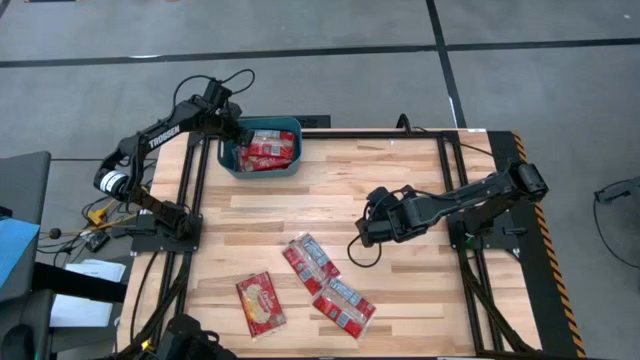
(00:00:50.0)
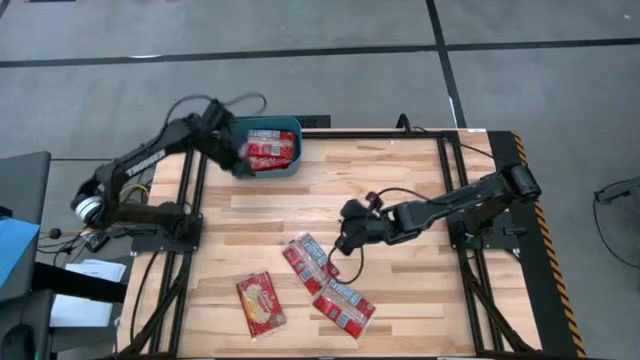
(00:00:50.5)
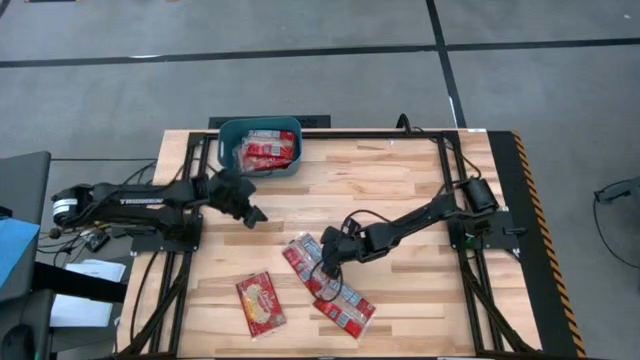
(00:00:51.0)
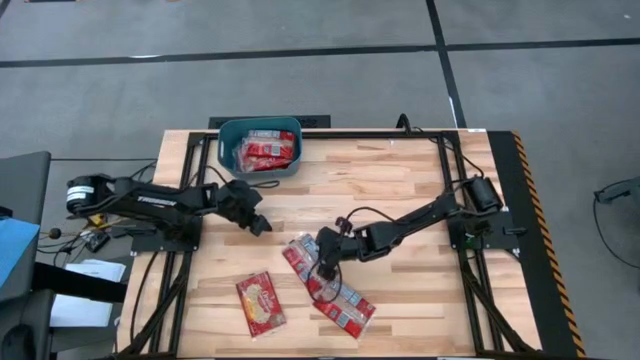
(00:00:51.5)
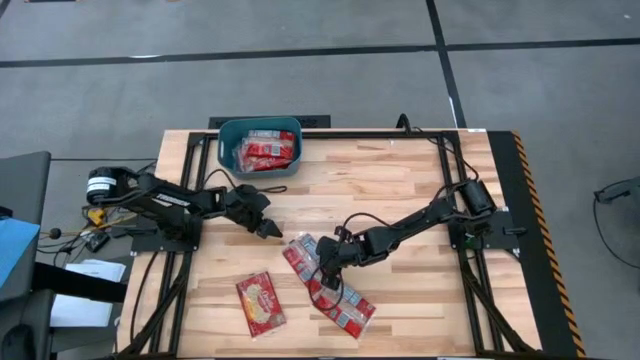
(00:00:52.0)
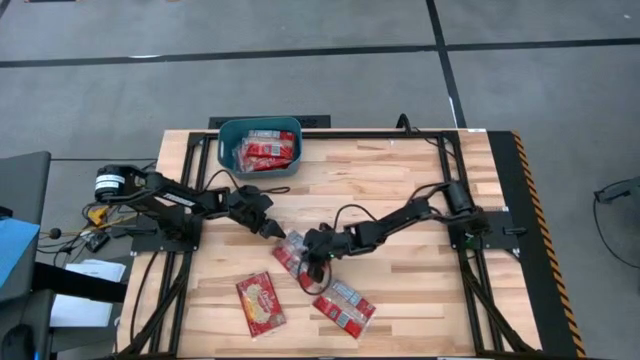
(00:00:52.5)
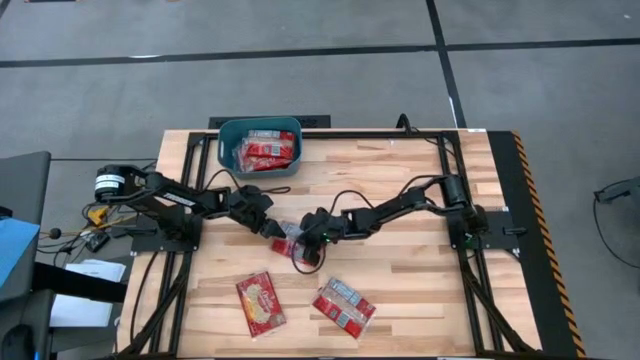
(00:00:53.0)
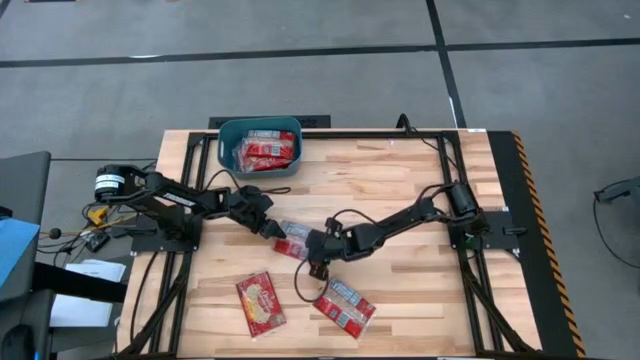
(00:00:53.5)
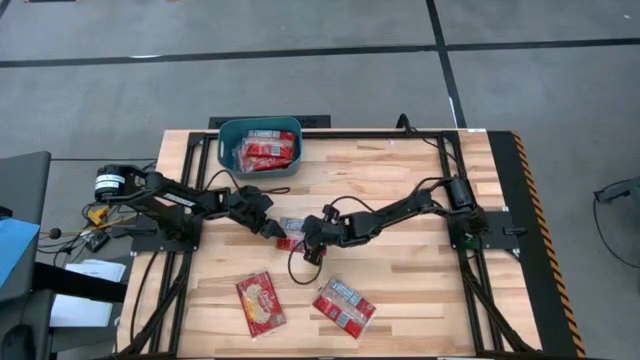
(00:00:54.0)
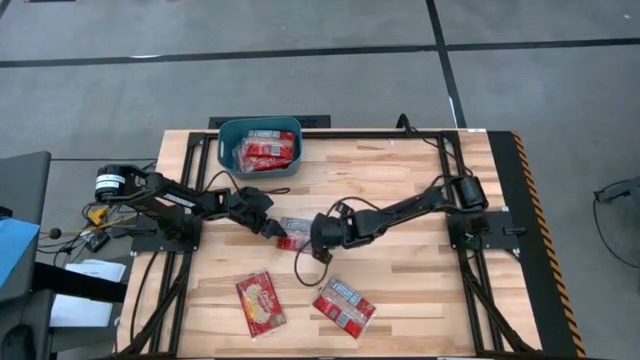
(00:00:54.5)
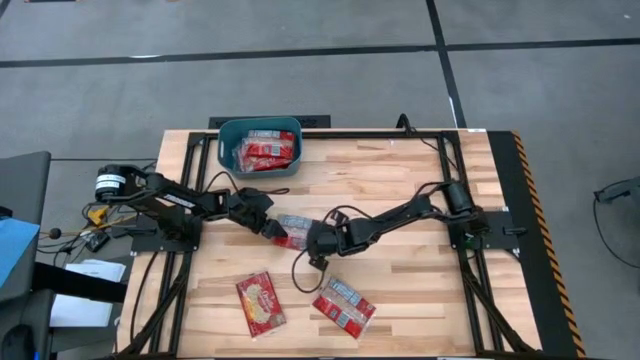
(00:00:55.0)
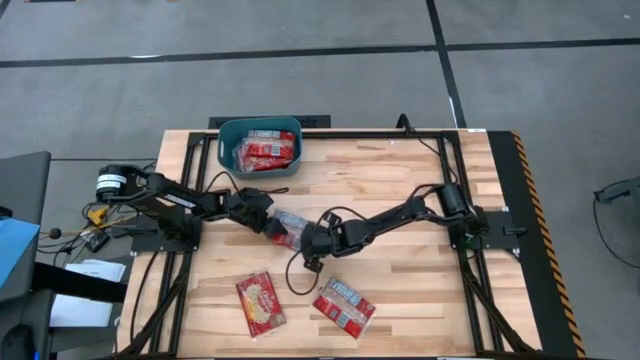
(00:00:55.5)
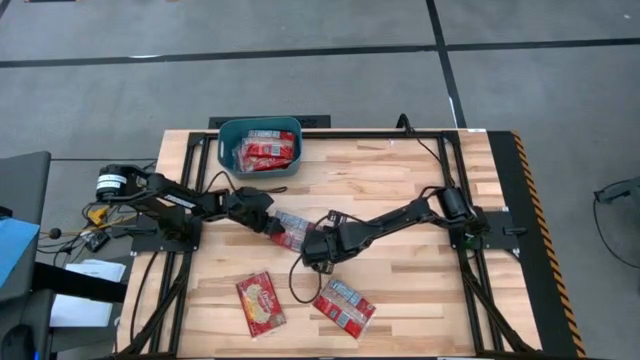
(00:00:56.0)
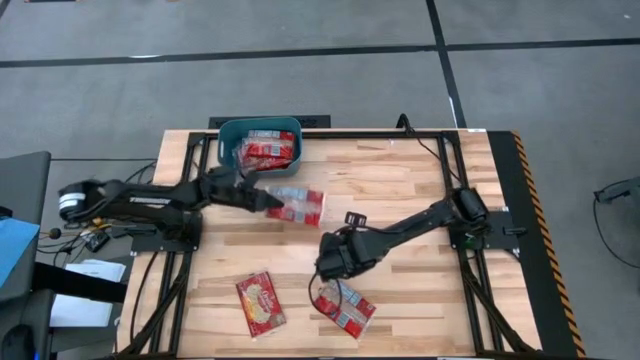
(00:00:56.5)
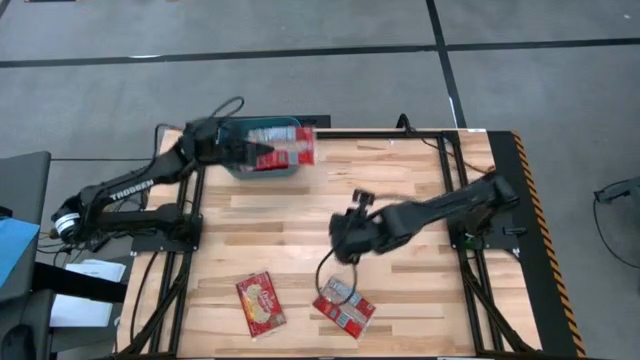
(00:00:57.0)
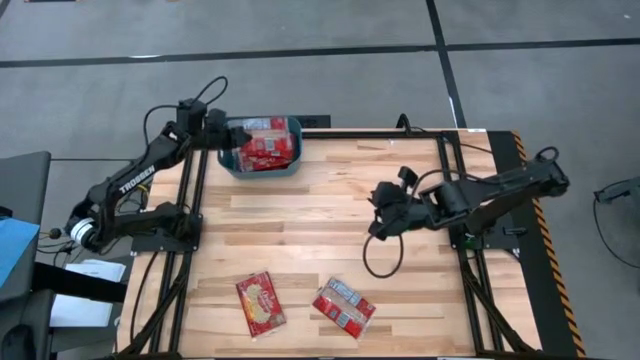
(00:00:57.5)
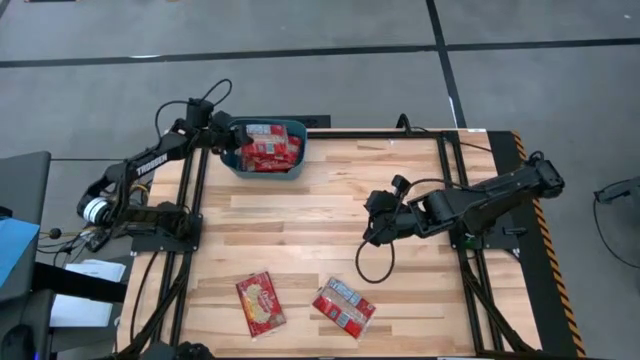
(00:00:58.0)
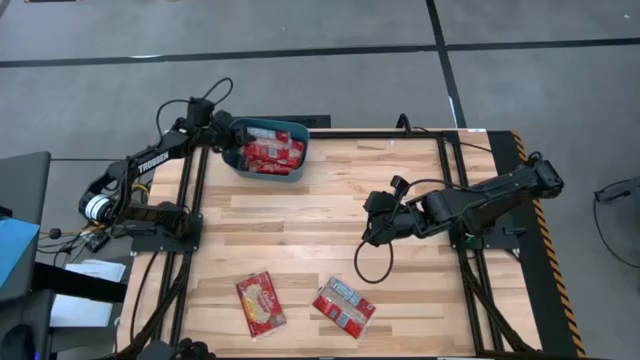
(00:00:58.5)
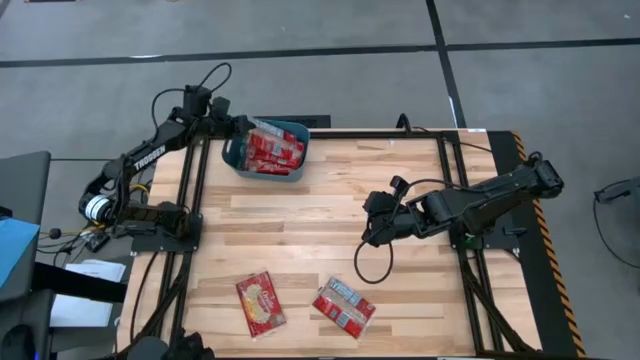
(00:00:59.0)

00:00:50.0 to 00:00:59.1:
Task: Sort popcorn bags into baskets
Put the red popcorn bag into the blue bin

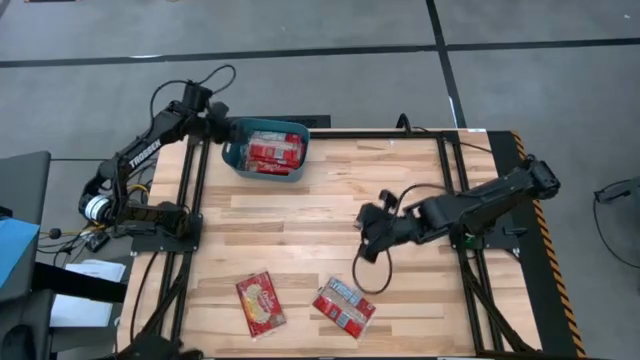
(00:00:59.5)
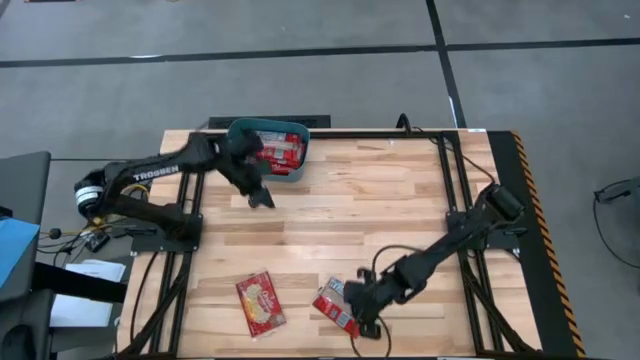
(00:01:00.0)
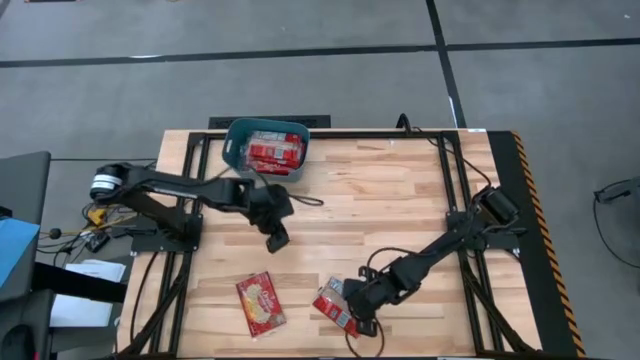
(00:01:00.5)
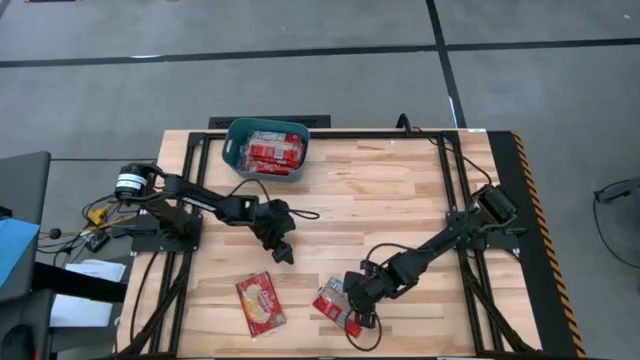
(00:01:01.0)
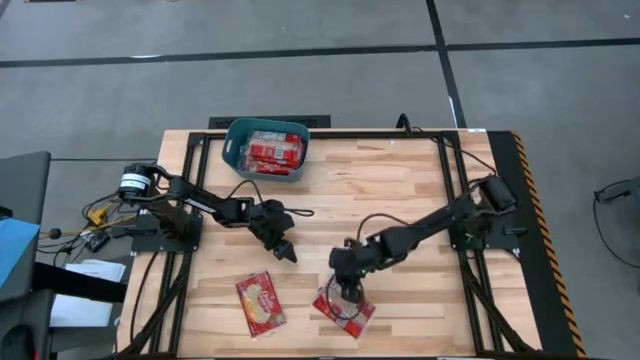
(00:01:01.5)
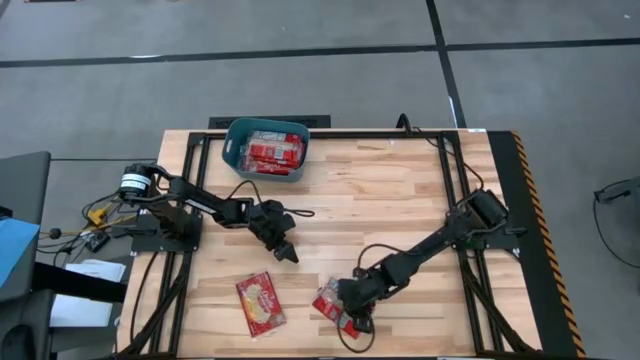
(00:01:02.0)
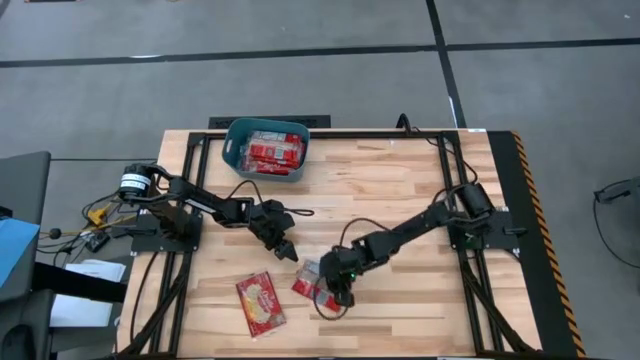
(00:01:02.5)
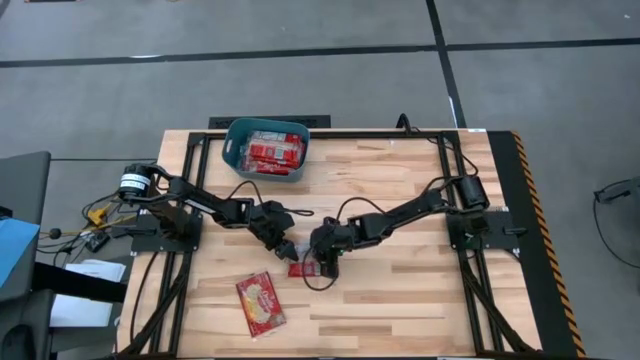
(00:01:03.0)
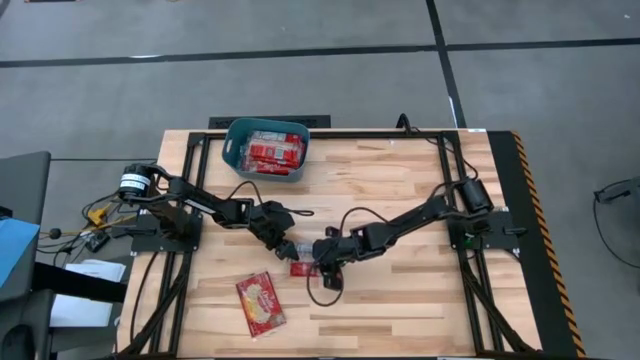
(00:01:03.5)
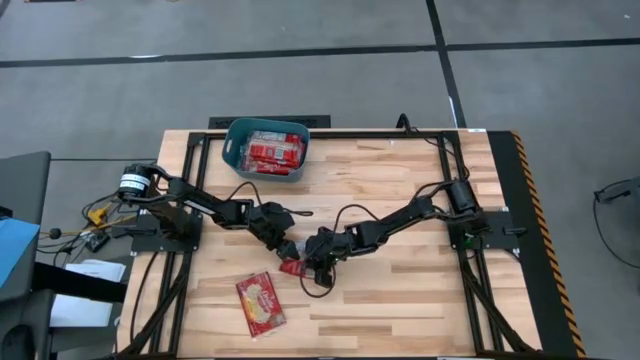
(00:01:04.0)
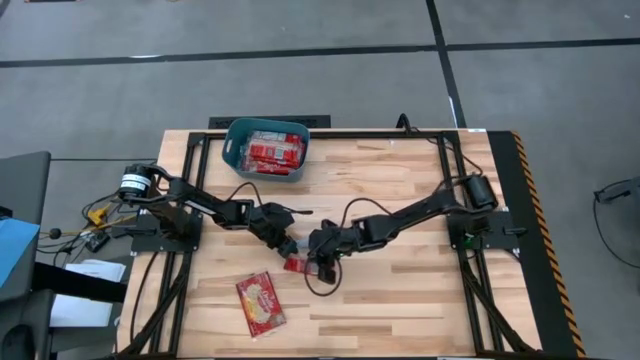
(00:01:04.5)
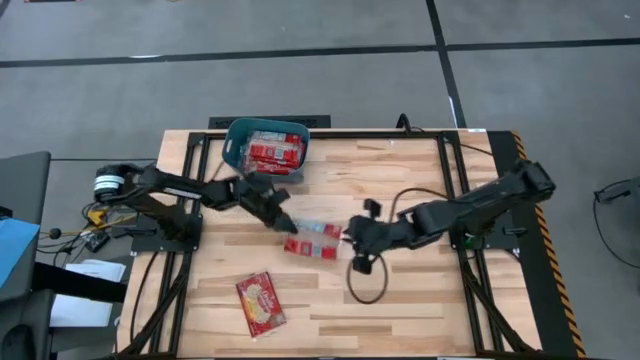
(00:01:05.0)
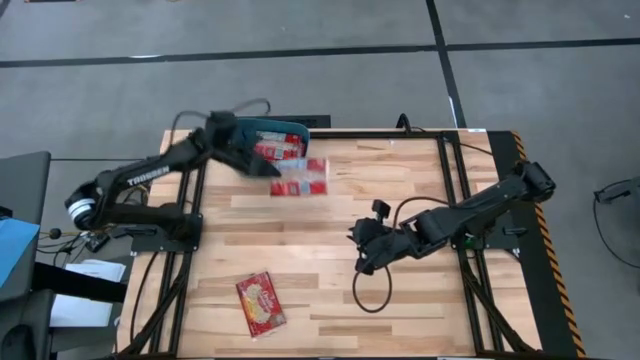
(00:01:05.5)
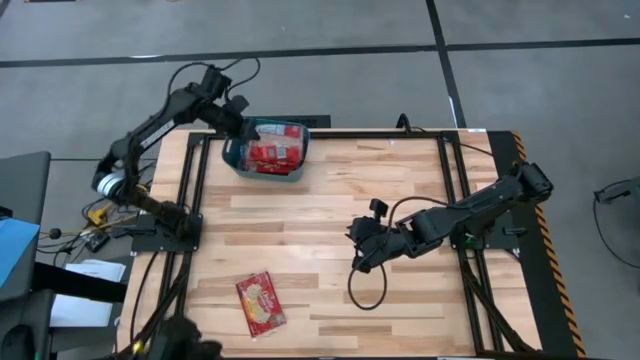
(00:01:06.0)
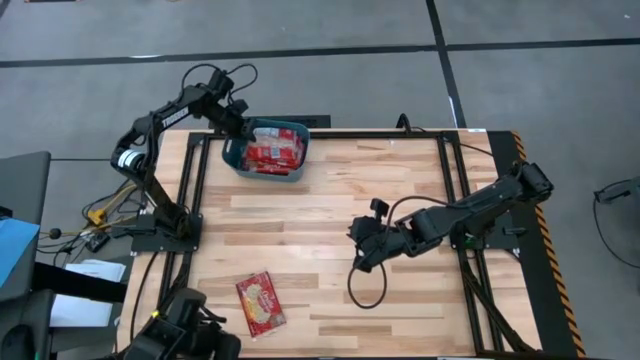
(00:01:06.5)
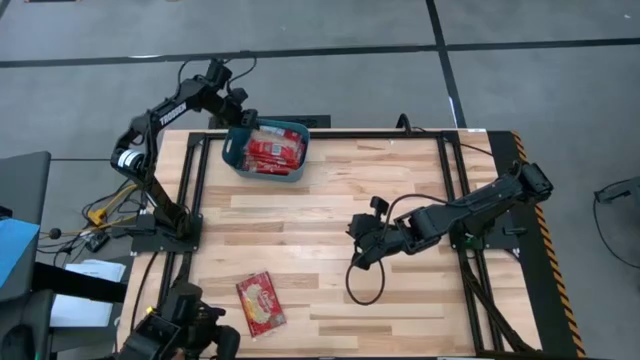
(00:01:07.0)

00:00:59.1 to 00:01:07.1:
Put the red popcorn bag into the blue bin
